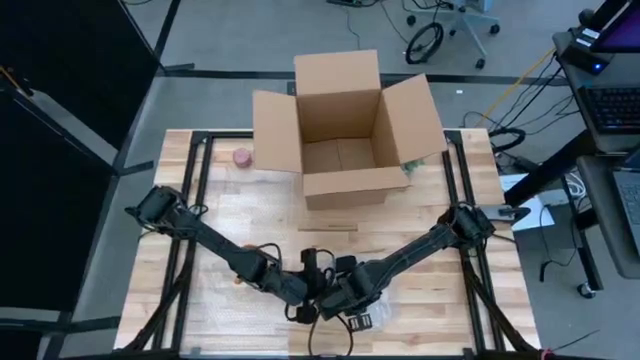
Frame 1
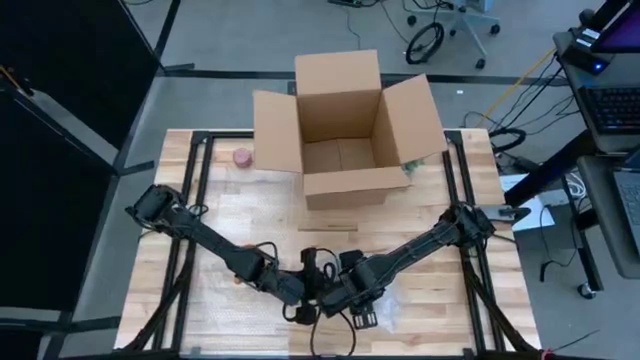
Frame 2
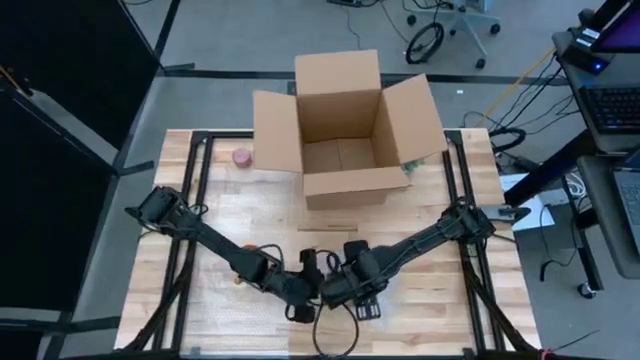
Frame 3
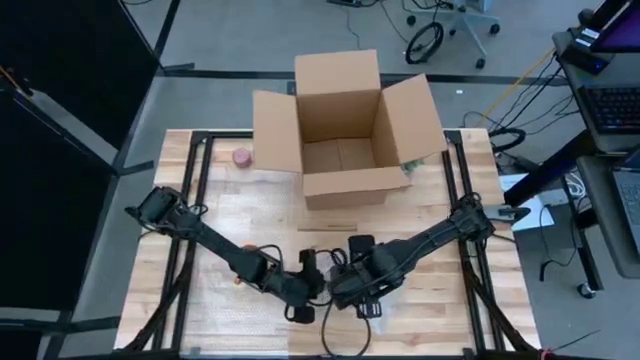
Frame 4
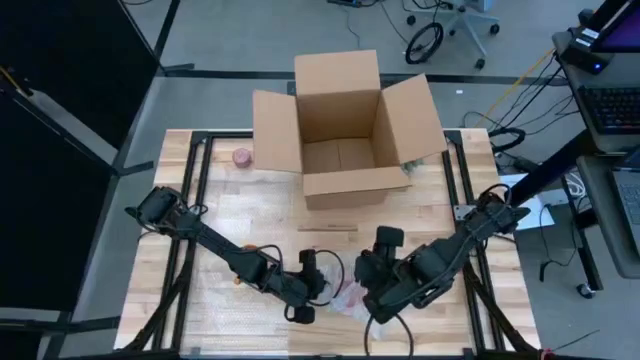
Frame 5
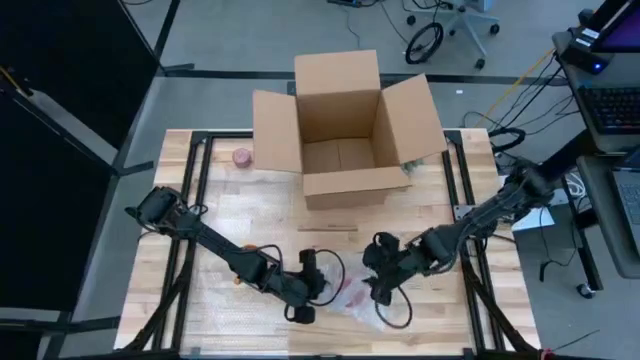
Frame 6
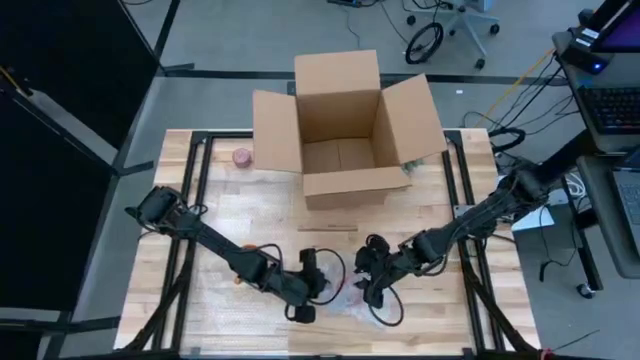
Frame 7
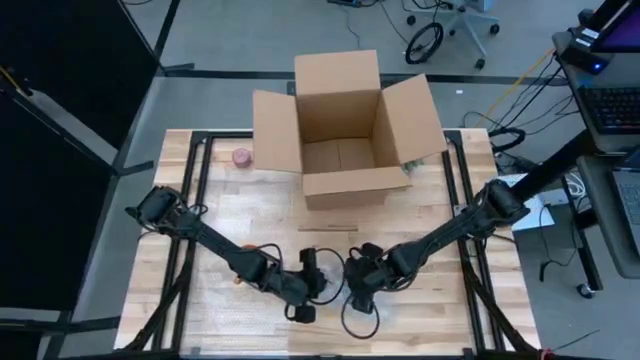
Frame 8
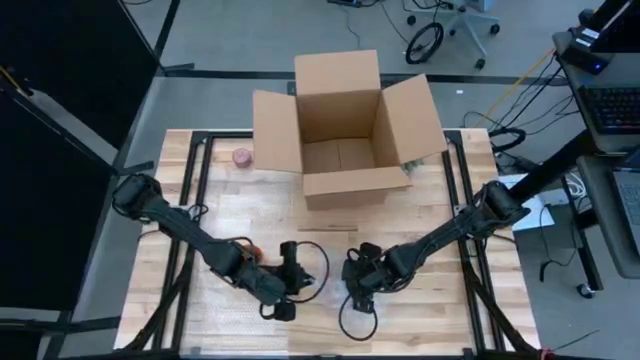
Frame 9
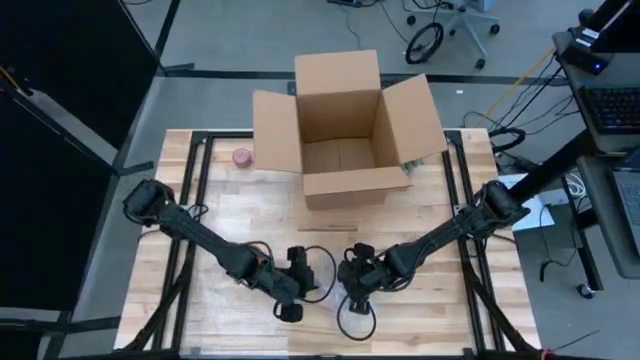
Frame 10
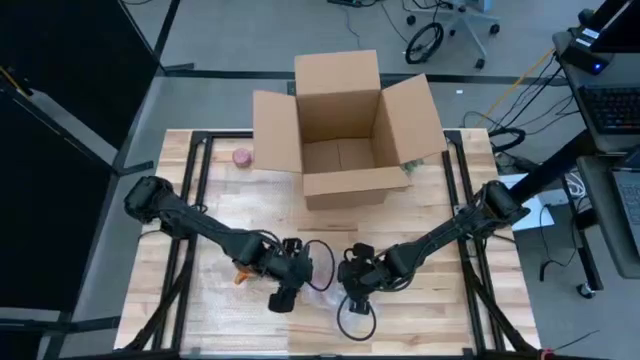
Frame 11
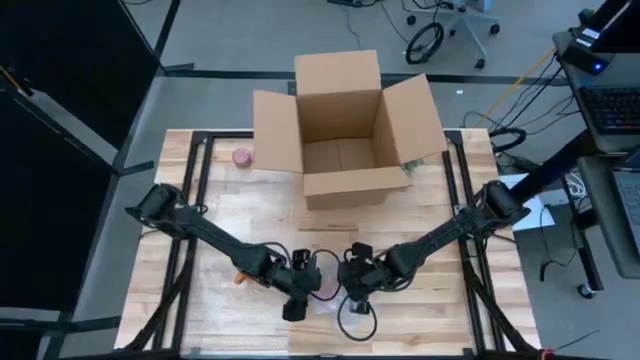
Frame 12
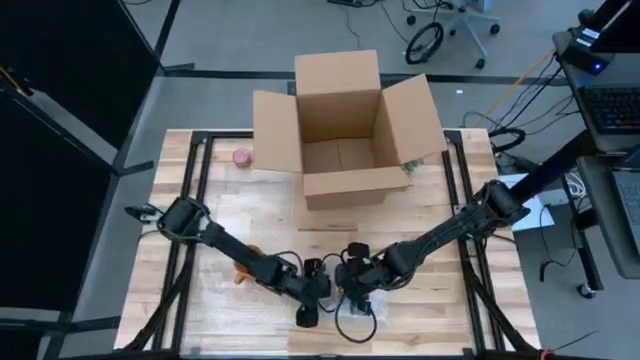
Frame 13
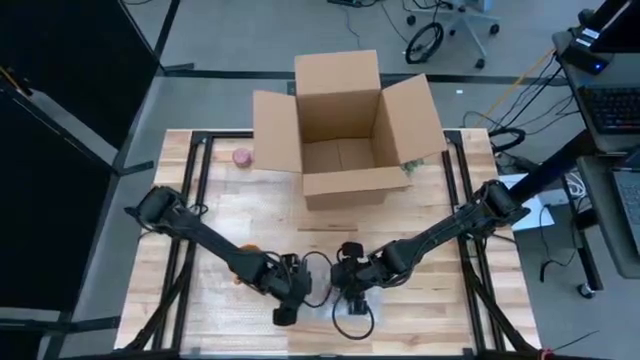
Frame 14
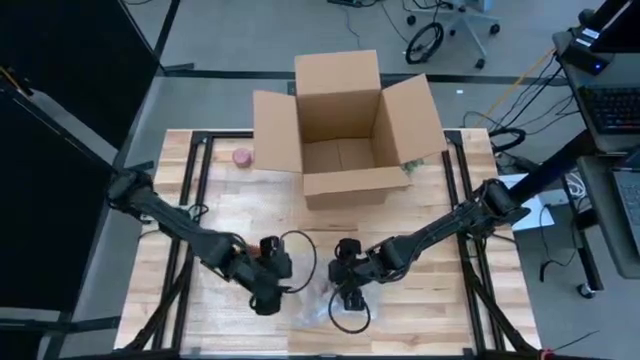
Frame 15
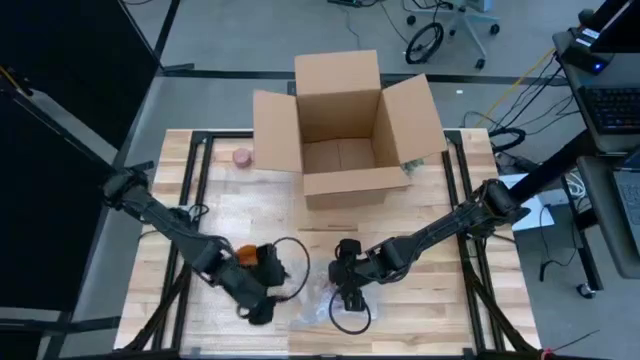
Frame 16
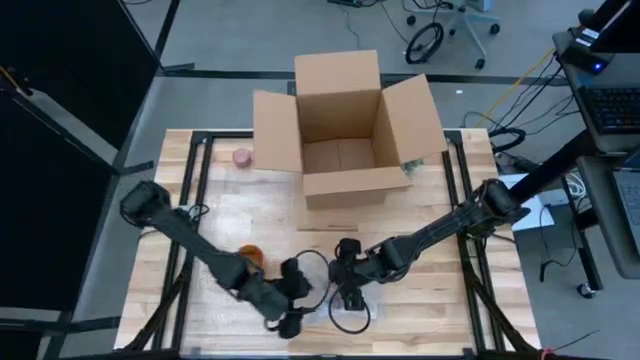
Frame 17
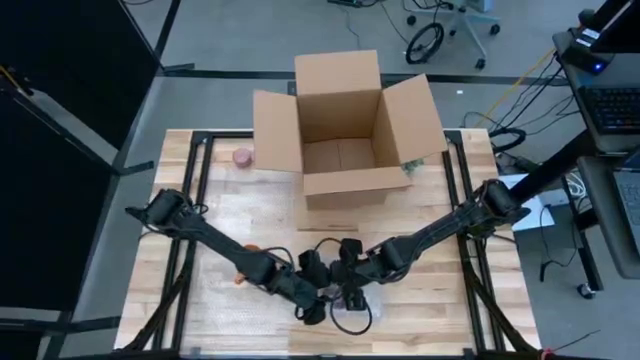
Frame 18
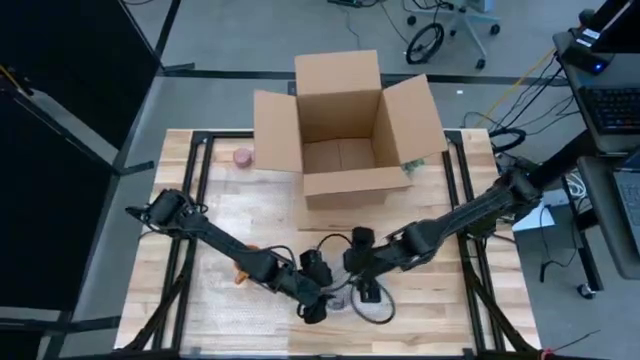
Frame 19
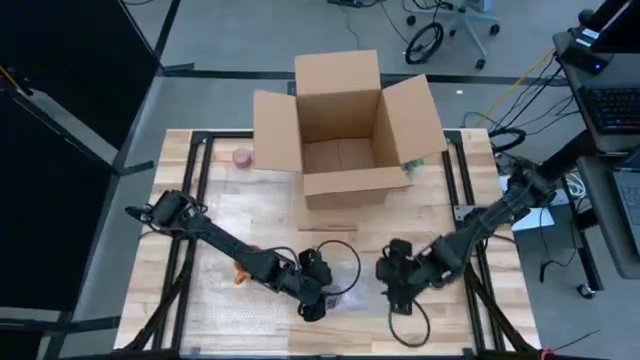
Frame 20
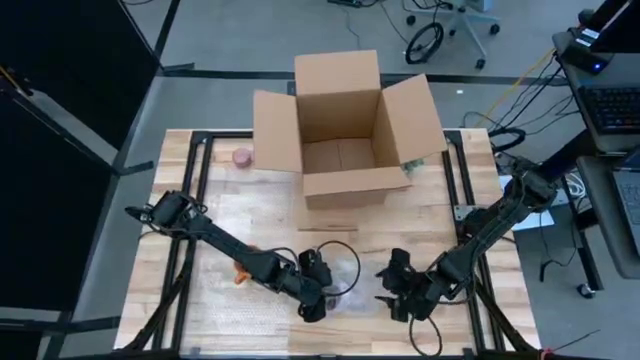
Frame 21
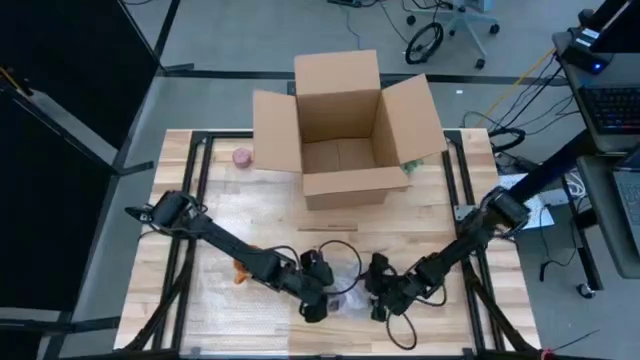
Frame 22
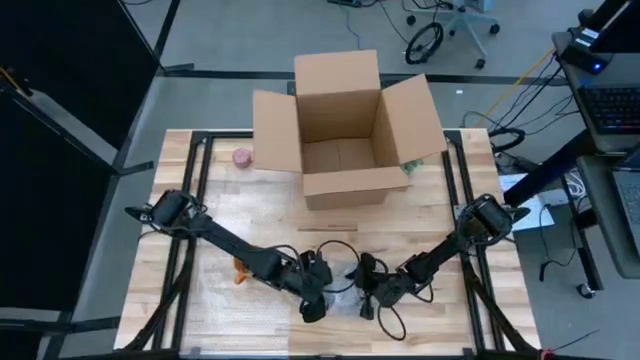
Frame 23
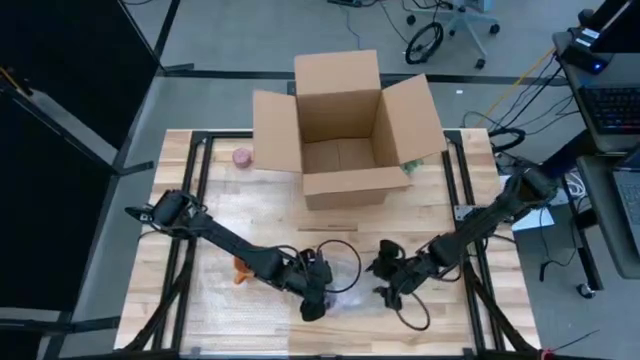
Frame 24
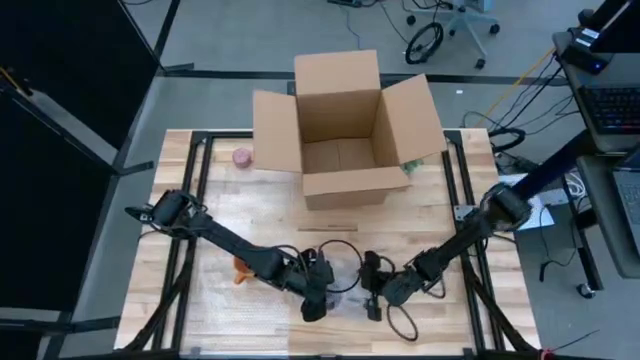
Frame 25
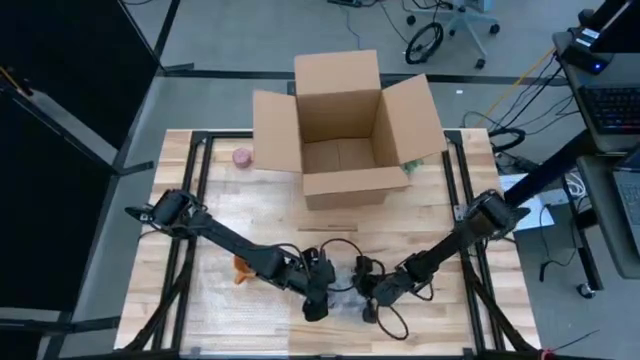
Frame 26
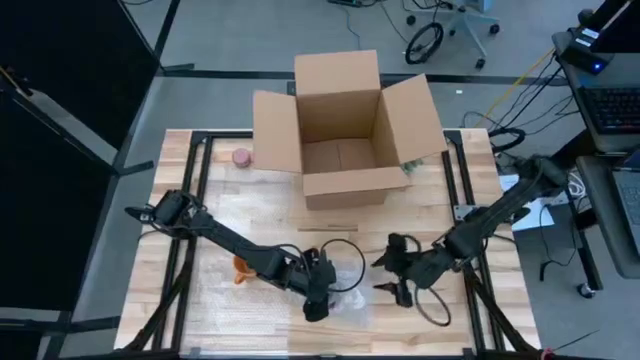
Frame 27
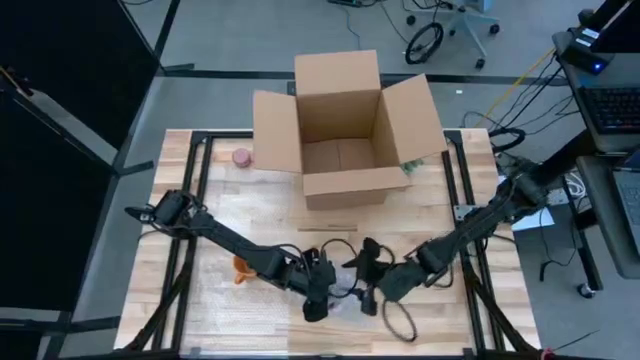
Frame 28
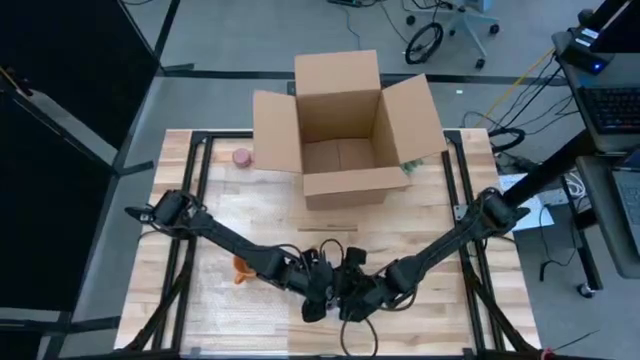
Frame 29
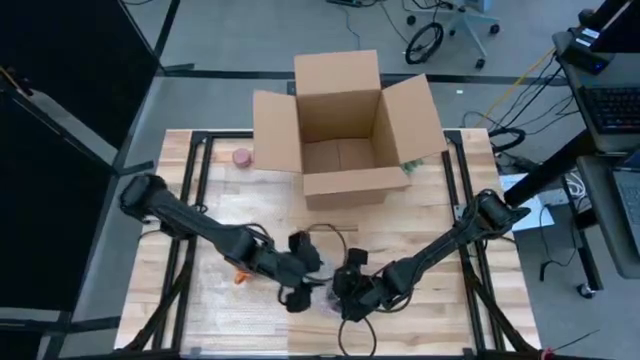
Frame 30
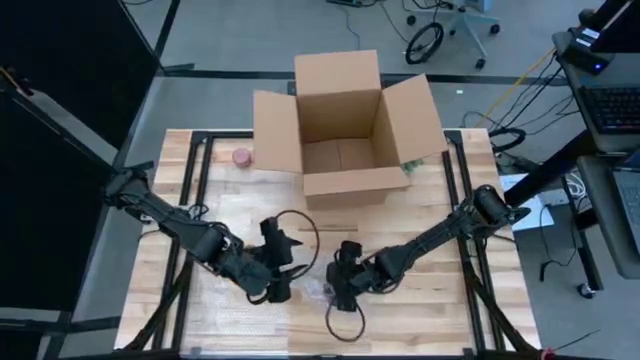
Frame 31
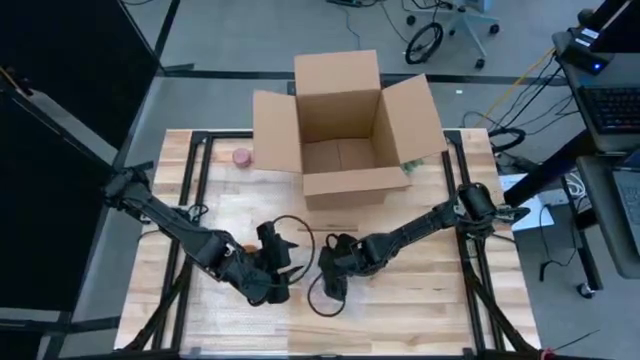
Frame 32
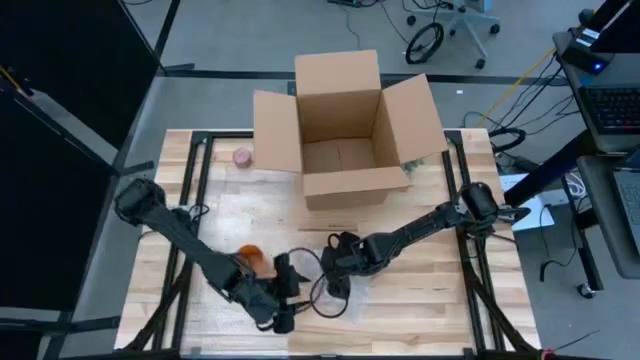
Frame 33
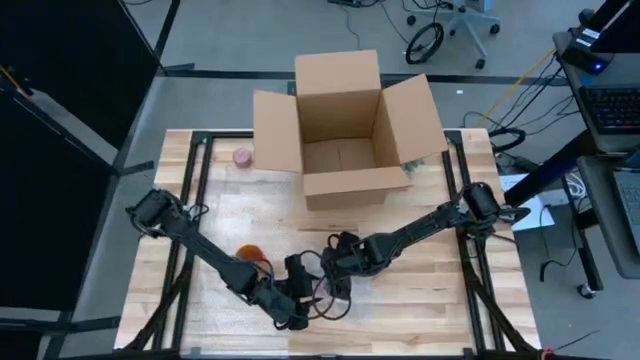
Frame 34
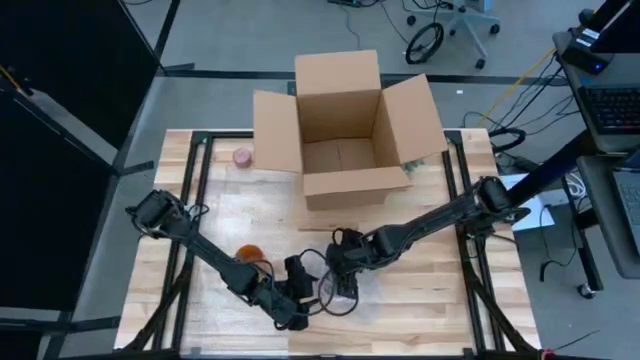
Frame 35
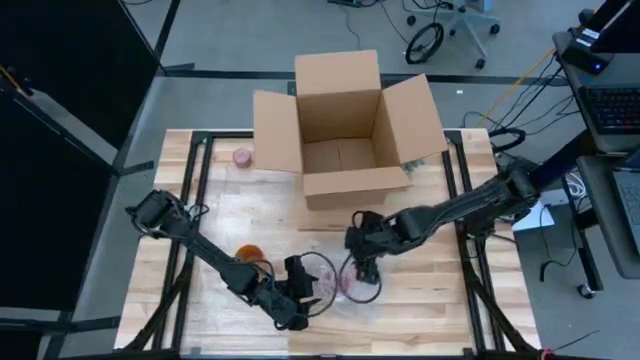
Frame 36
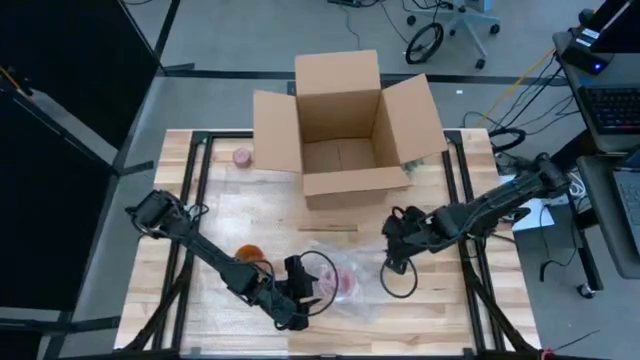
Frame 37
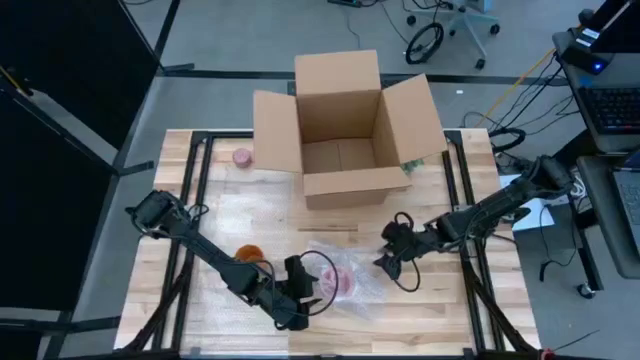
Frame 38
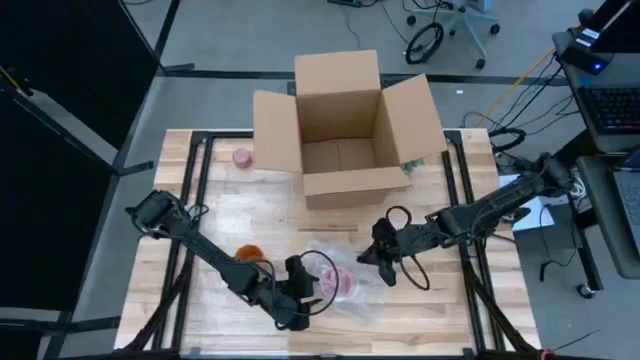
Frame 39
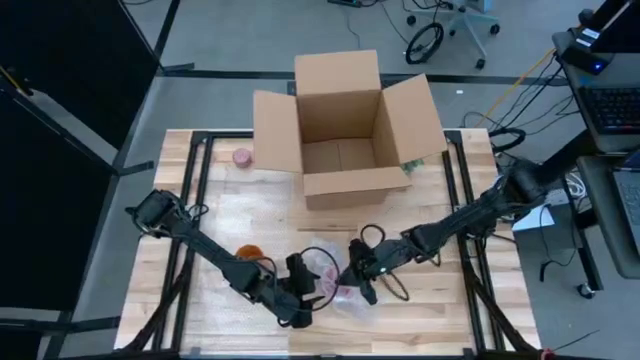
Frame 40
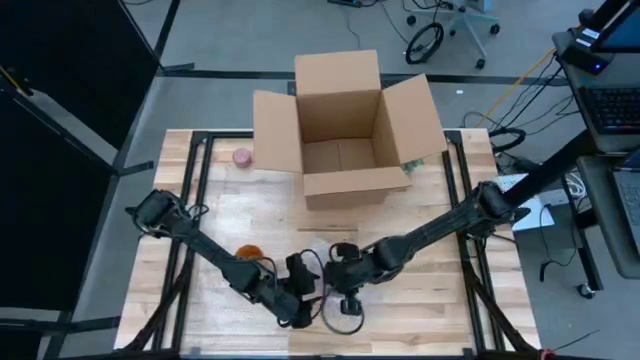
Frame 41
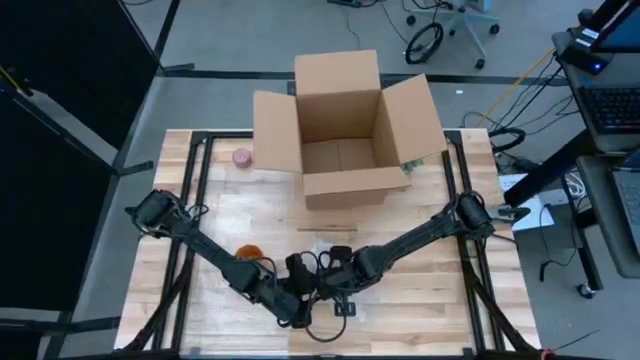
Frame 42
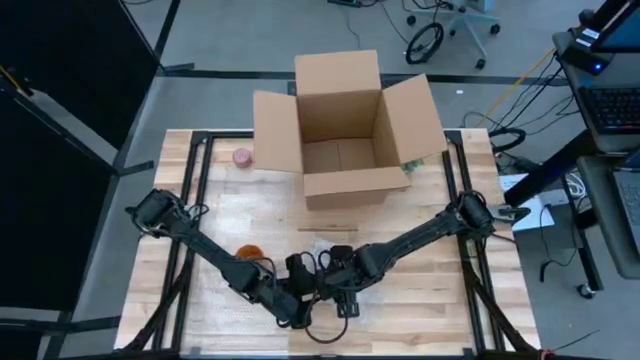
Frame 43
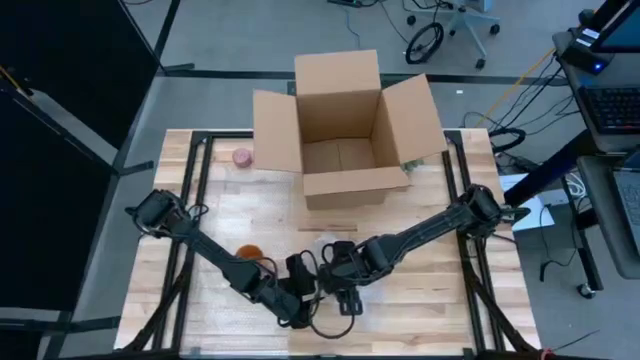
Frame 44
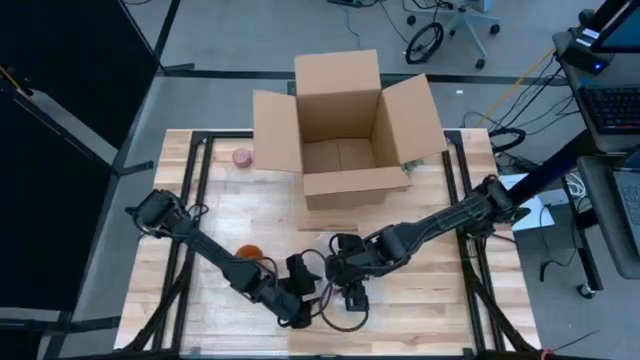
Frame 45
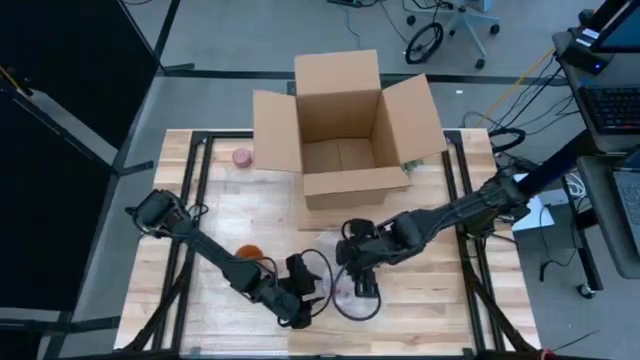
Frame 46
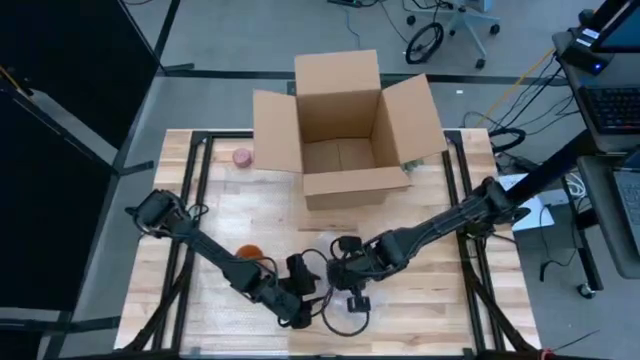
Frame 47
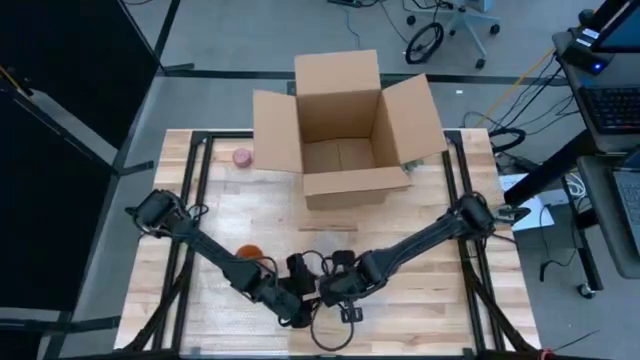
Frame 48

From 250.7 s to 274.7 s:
Task: wrap mug
Wrap the pink cup with the bubble wrap
